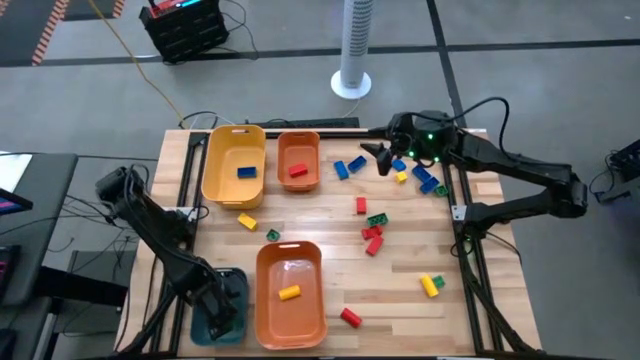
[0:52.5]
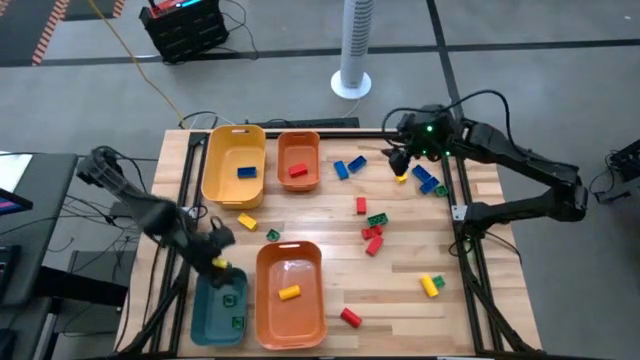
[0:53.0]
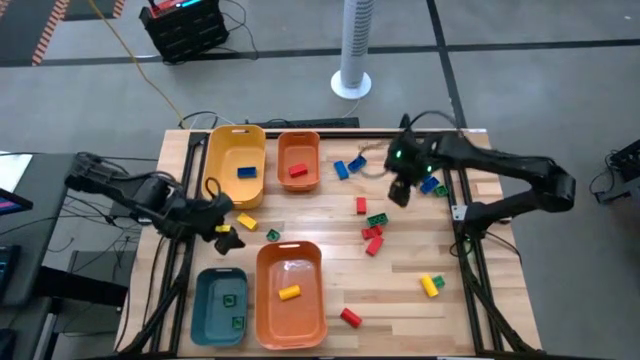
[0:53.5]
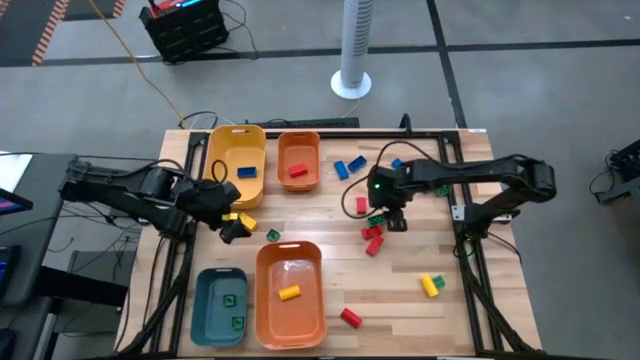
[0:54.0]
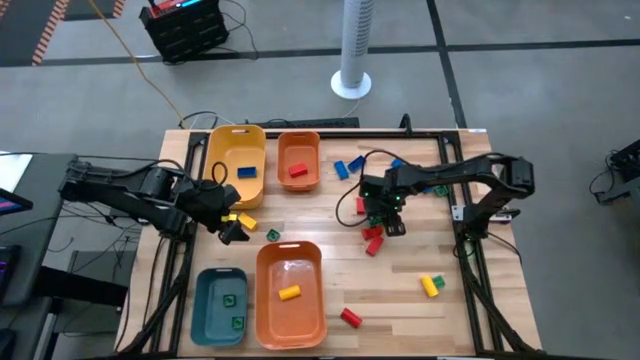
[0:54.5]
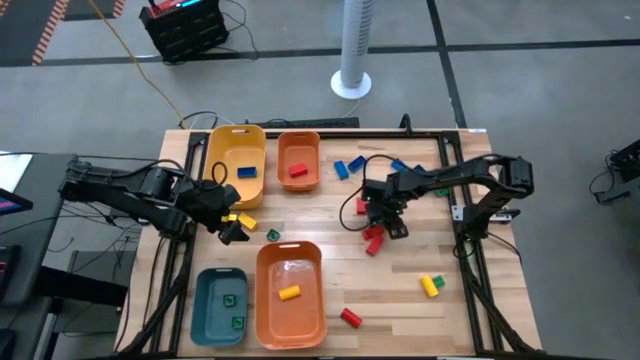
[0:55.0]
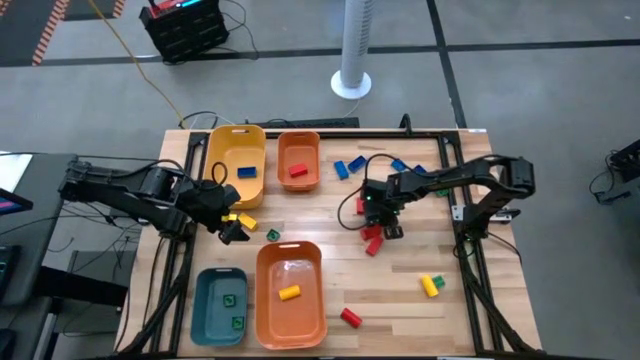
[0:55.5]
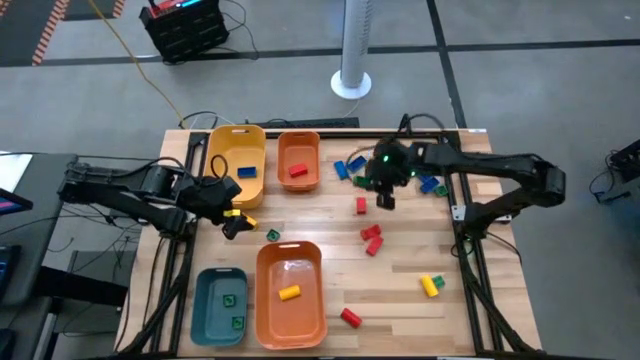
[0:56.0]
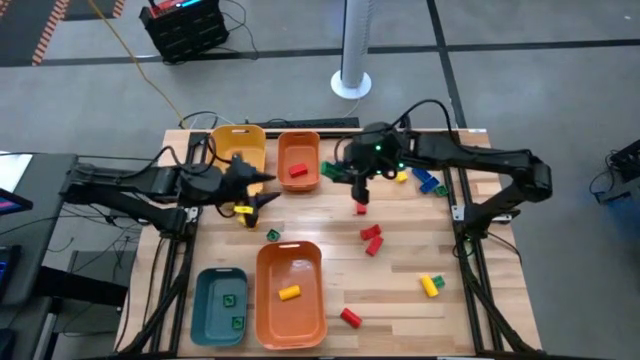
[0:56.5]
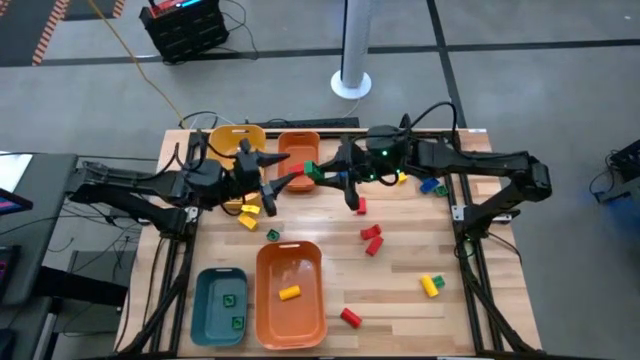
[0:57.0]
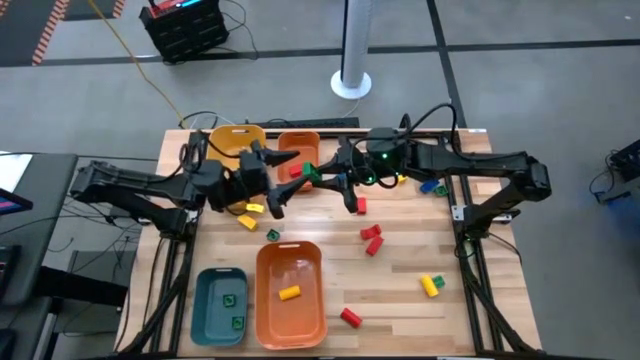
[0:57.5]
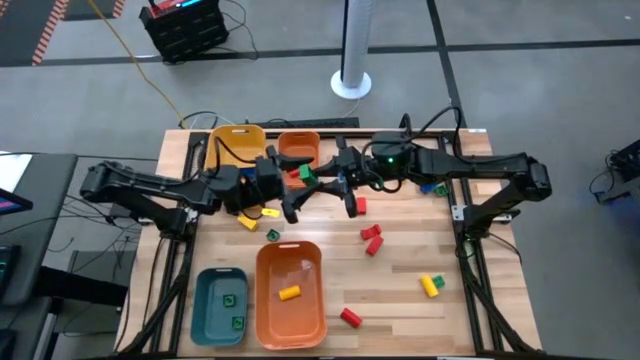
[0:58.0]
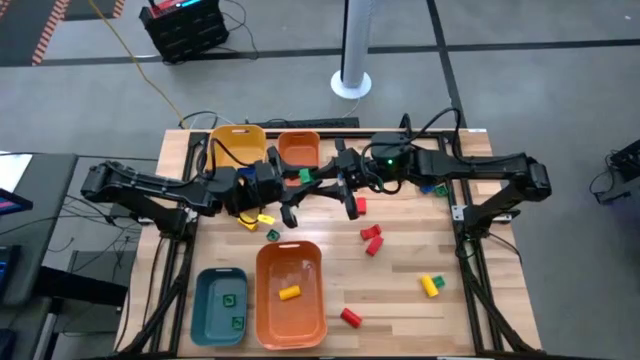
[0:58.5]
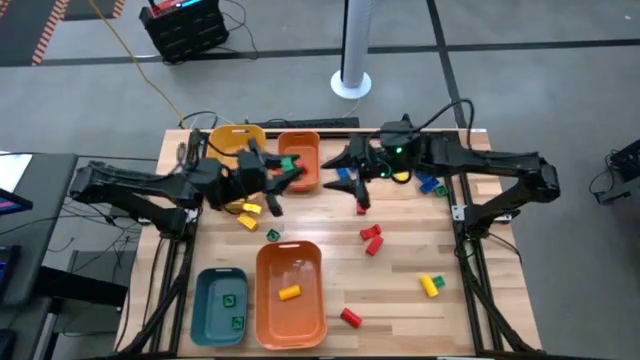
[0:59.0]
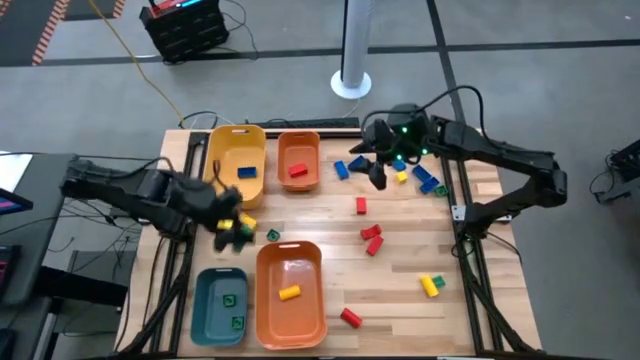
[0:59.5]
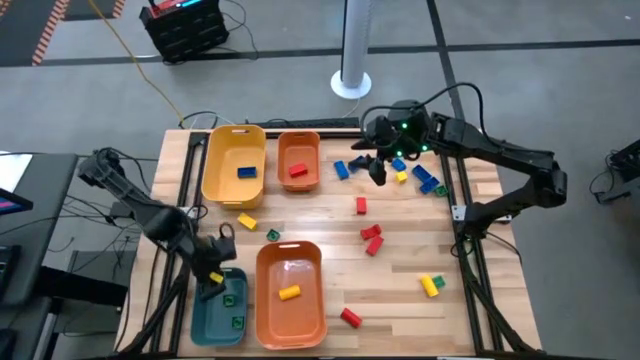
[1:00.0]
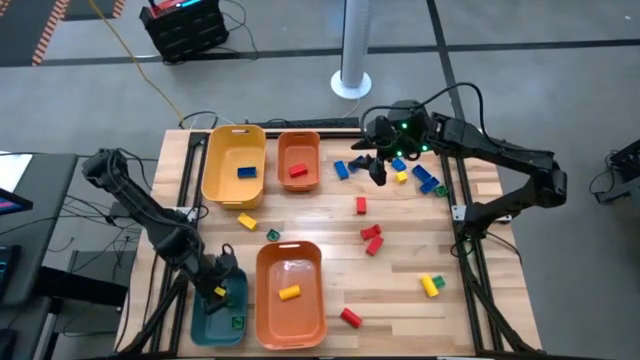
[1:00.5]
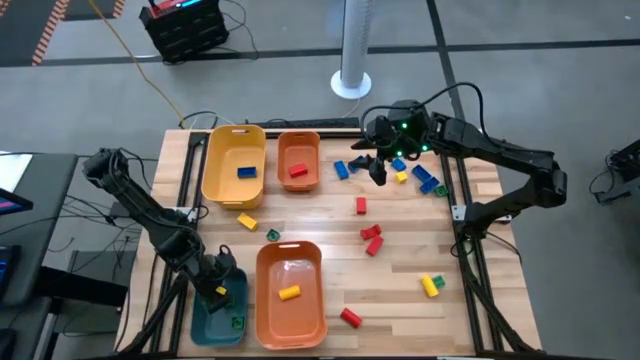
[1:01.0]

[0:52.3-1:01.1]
Task: Sort blocks
Put the green game piece into the blue bin

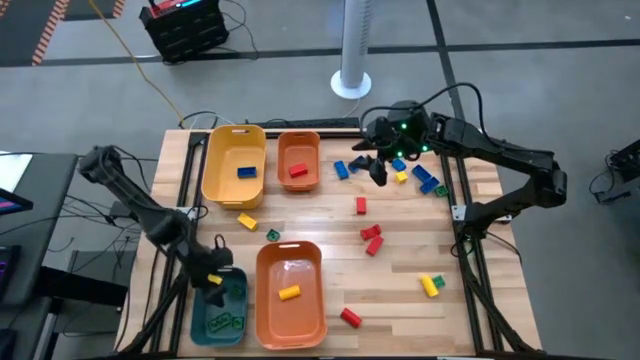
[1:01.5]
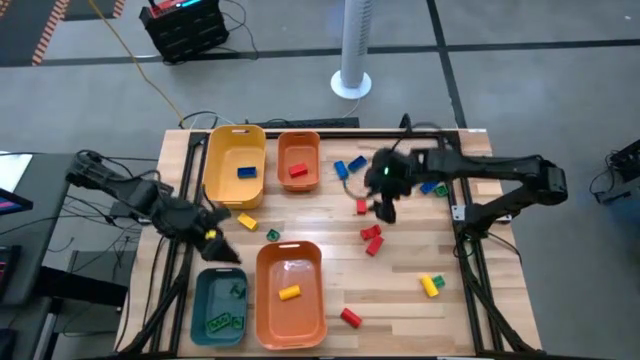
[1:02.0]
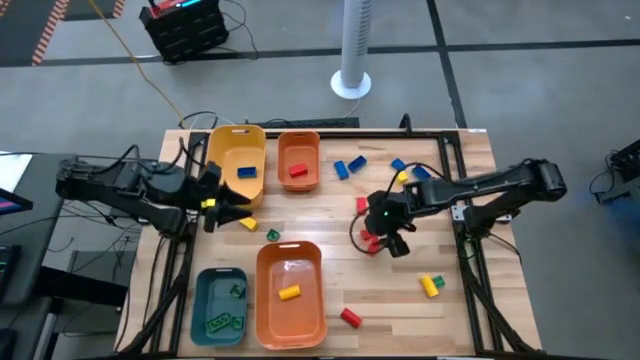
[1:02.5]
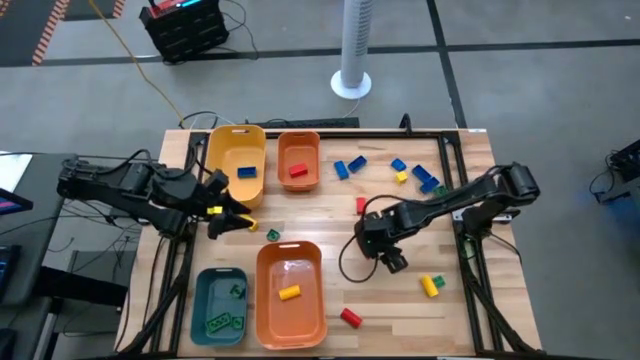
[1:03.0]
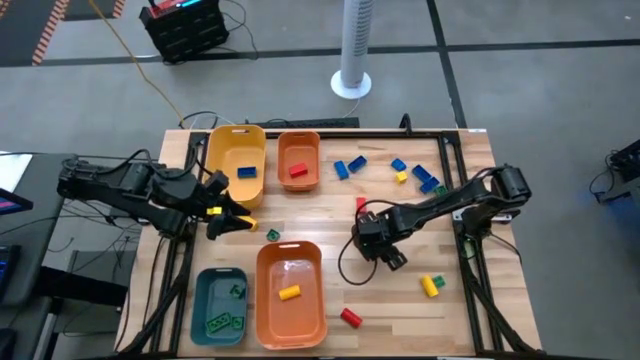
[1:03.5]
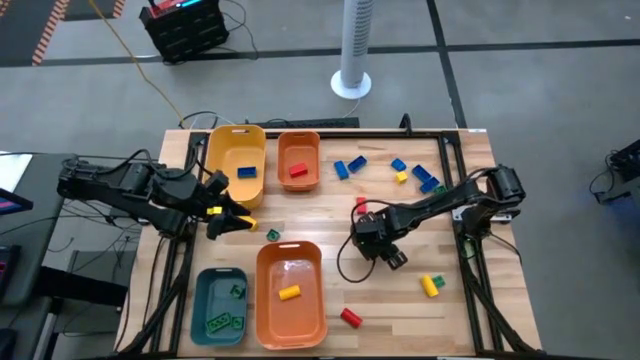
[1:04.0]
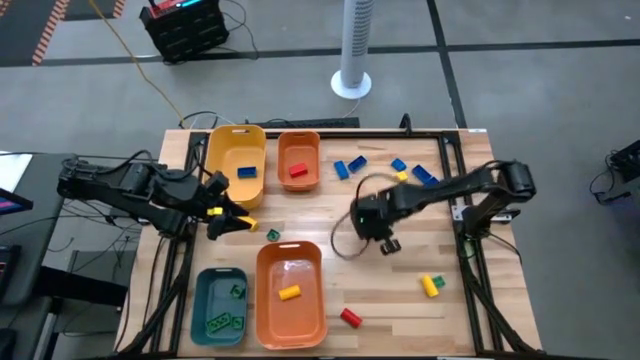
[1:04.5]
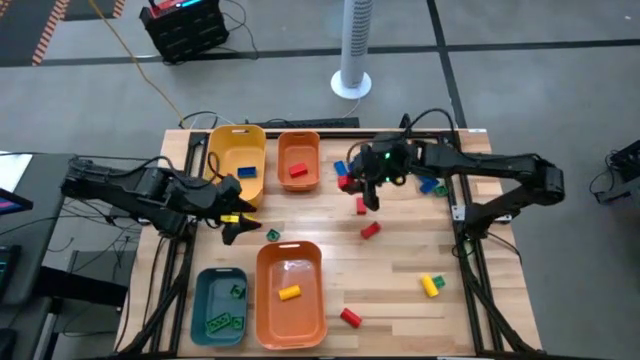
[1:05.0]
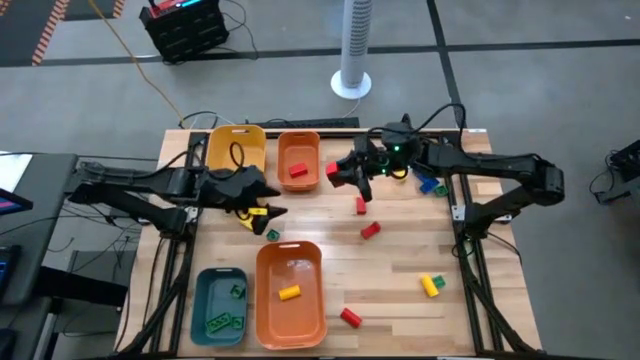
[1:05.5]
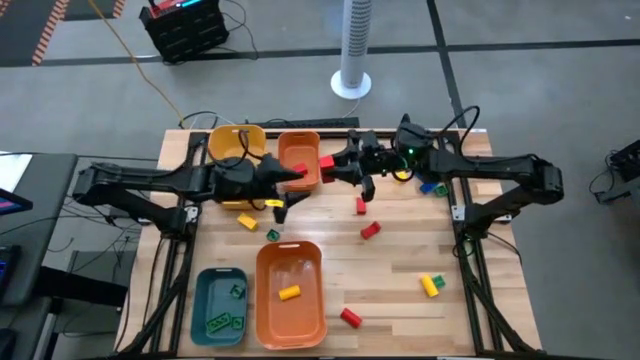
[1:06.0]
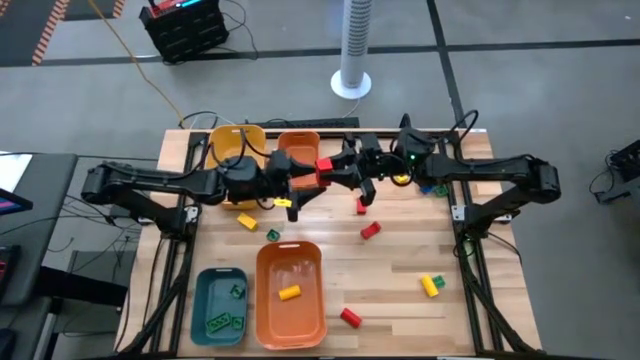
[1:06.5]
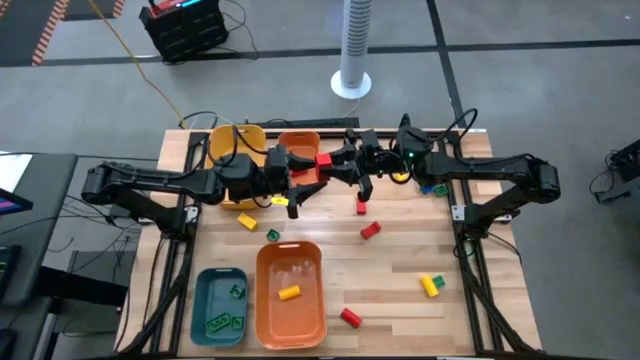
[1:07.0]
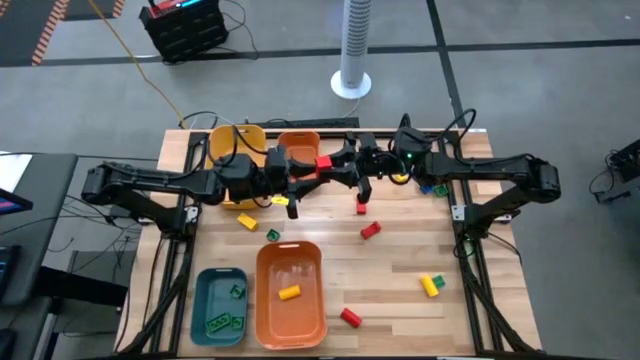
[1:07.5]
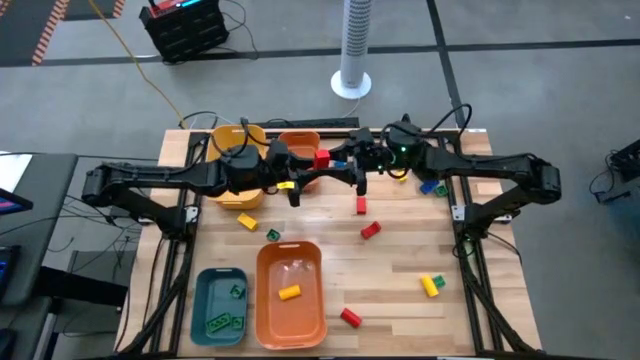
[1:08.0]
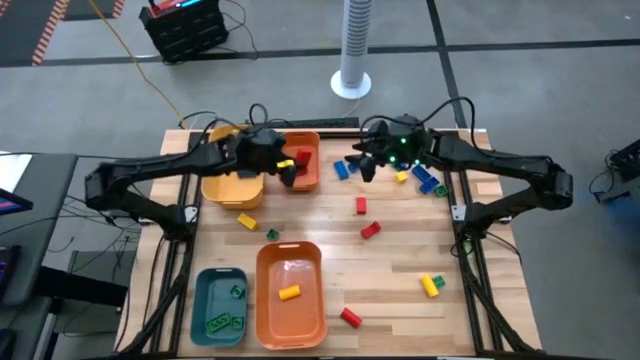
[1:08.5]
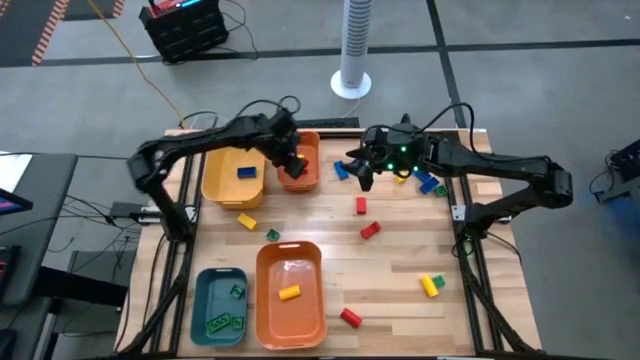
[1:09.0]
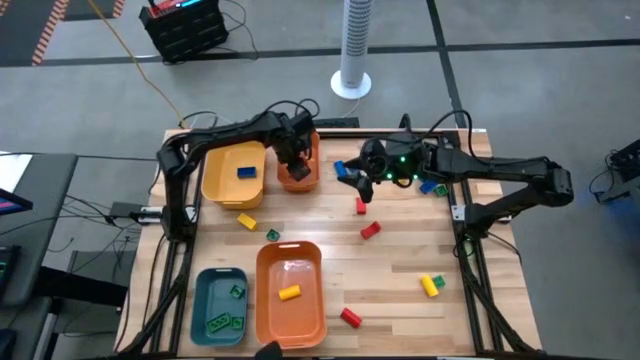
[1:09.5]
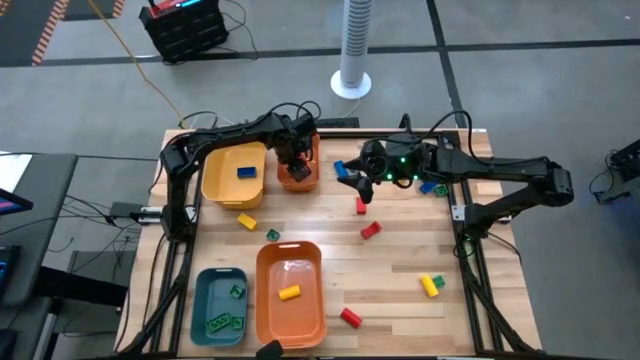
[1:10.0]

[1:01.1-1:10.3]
Put the red block into the top orange bin

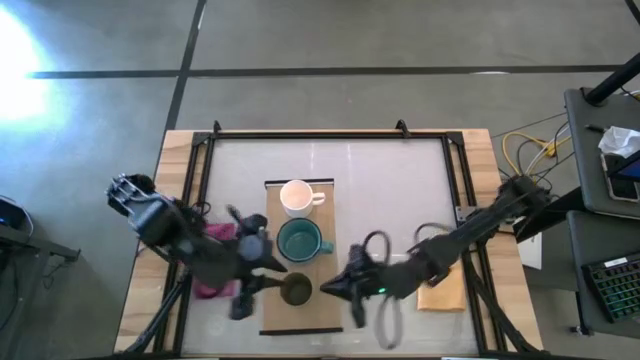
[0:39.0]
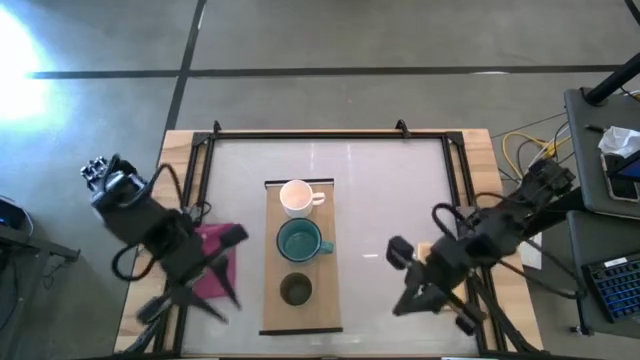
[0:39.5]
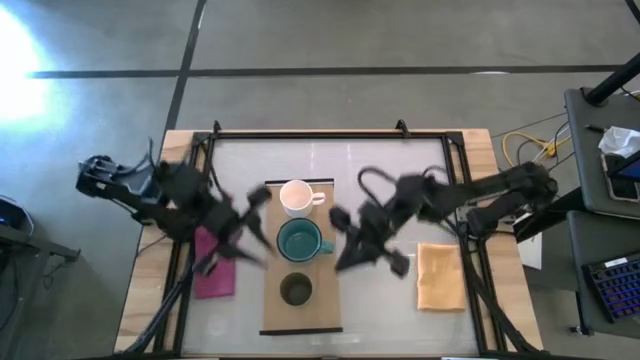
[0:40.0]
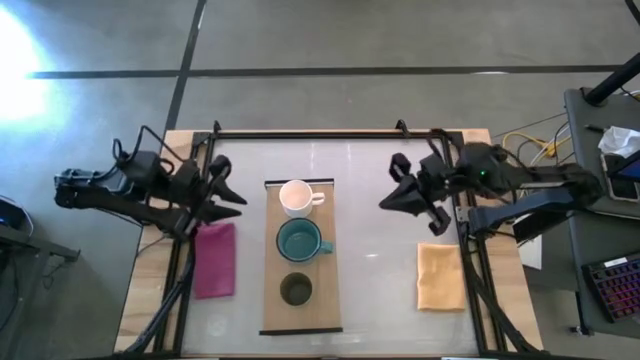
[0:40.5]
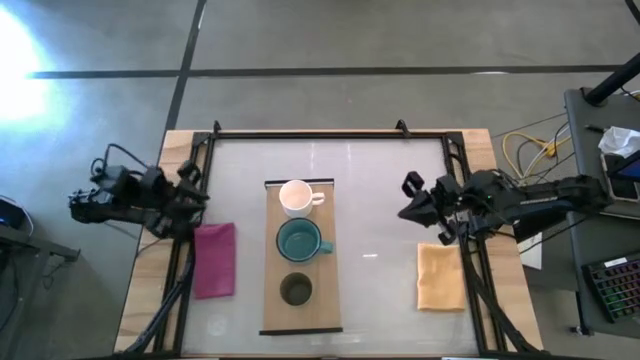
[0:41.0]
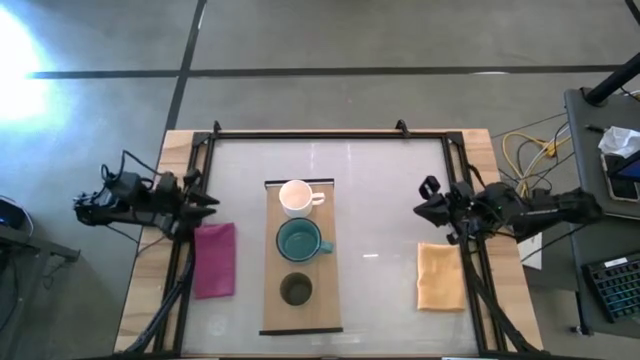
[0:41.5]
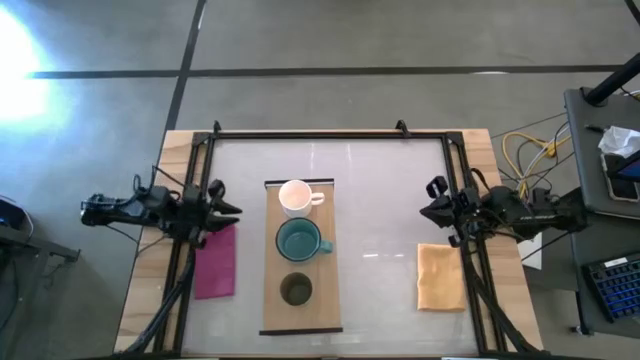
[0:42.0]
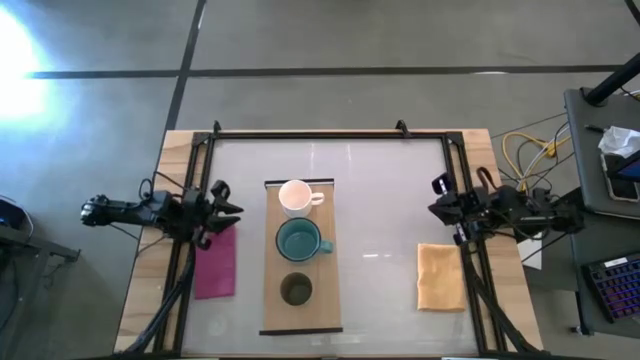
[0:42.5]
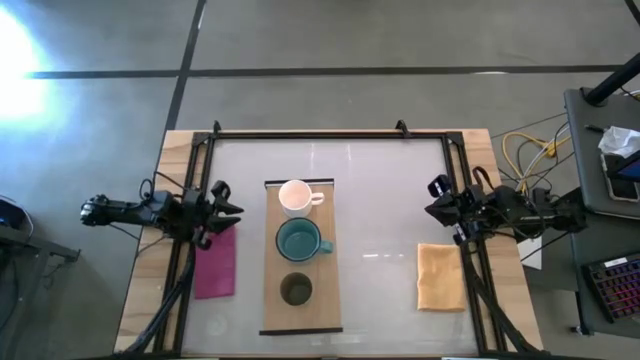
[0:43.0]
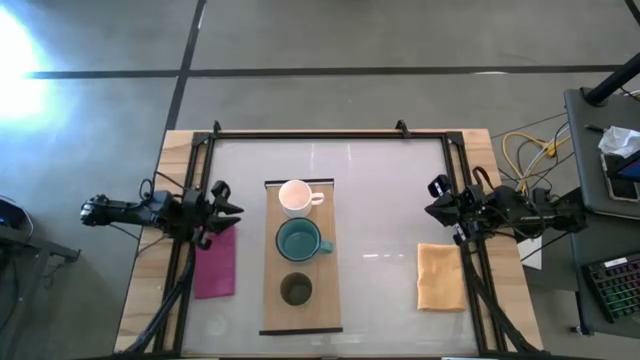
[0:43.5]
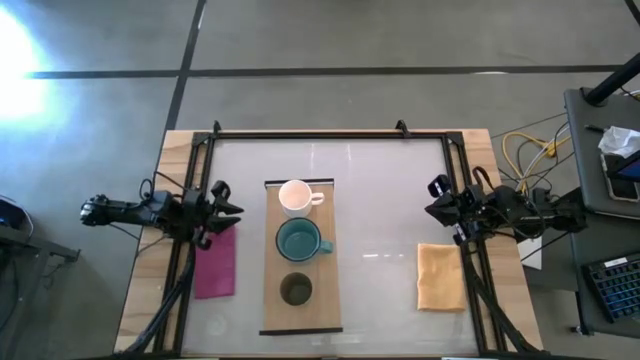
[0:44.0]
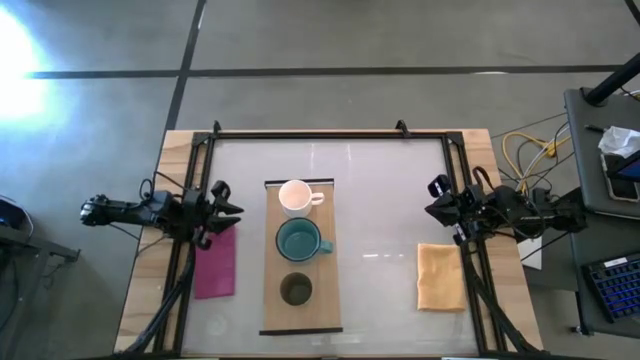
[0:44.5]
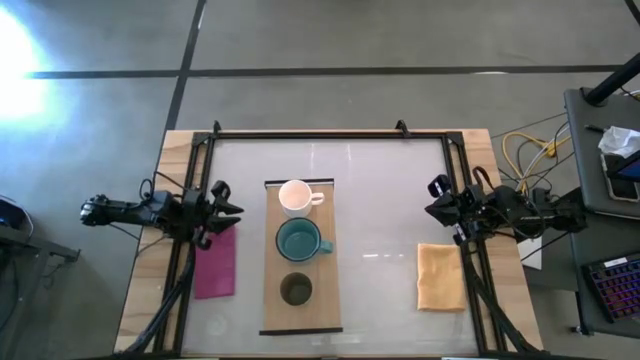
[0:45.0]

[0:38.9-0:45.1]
Task: Stack small to large cups/mugs on shelf
Return to Home Position
